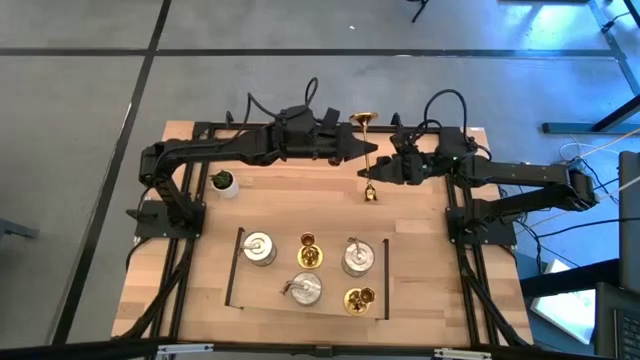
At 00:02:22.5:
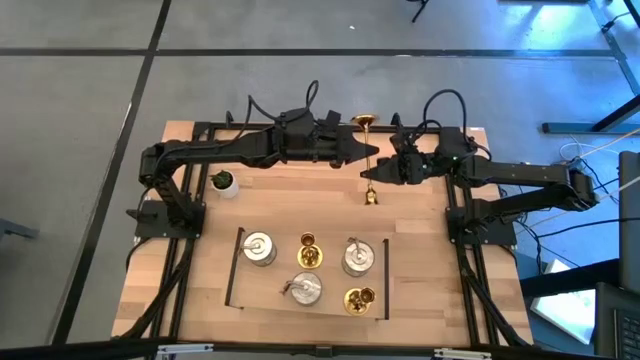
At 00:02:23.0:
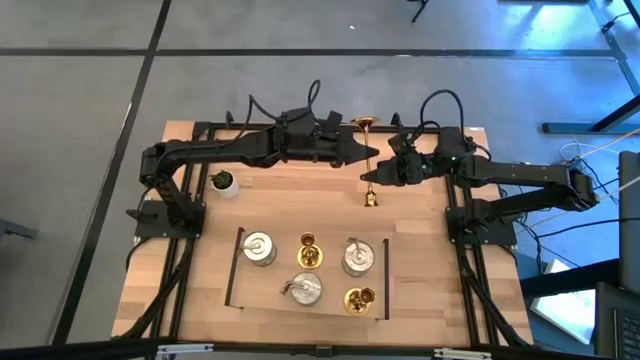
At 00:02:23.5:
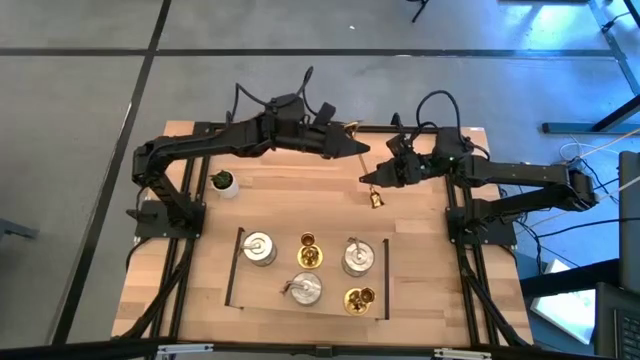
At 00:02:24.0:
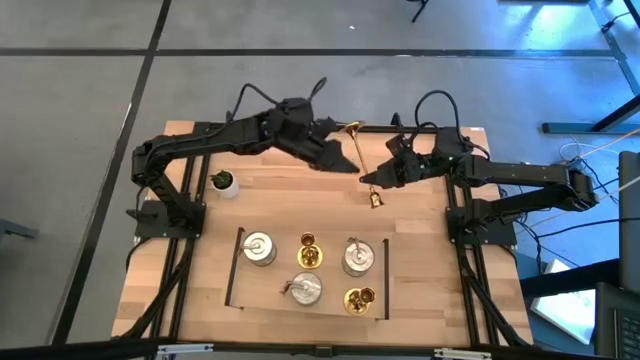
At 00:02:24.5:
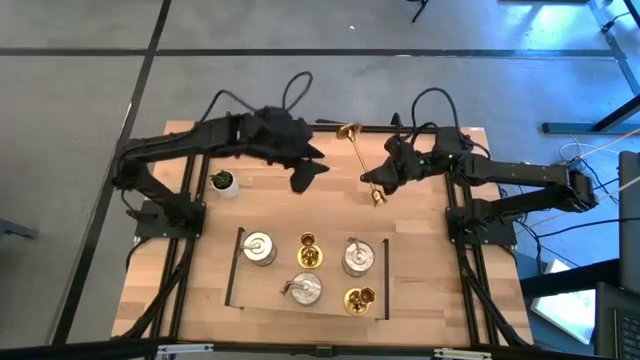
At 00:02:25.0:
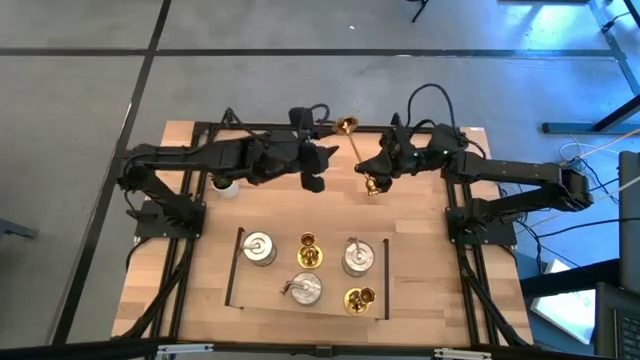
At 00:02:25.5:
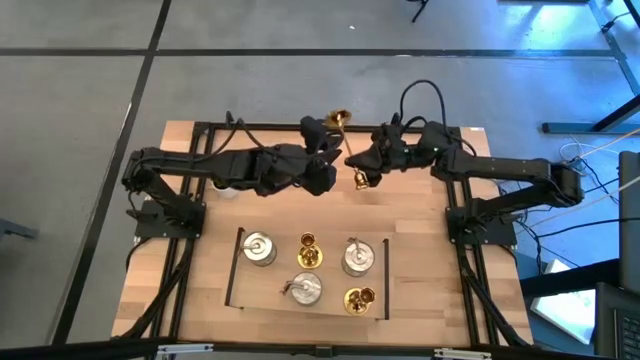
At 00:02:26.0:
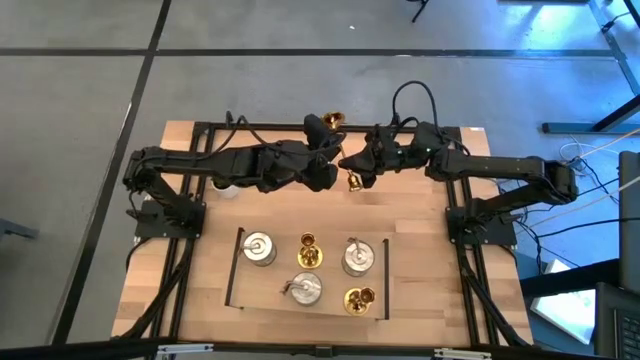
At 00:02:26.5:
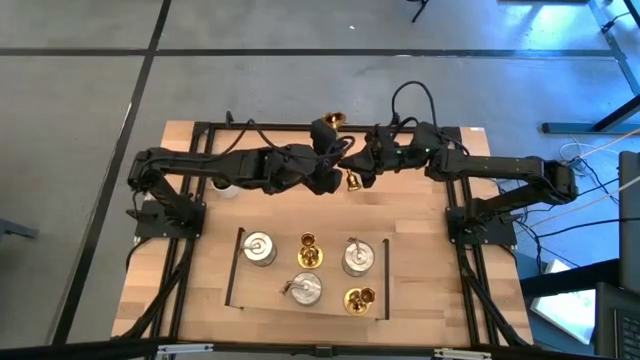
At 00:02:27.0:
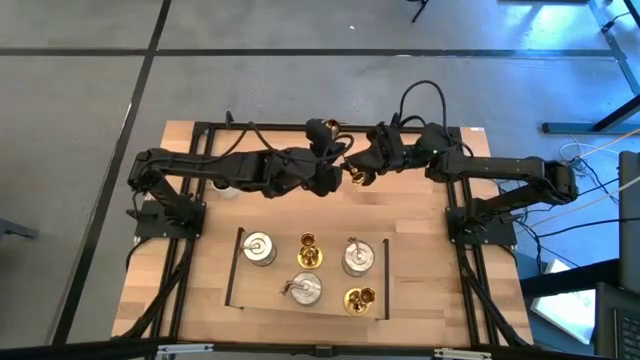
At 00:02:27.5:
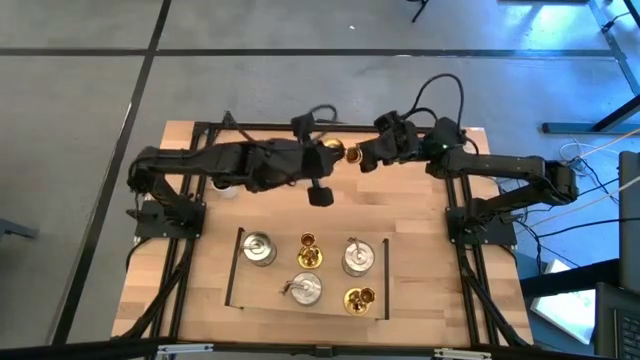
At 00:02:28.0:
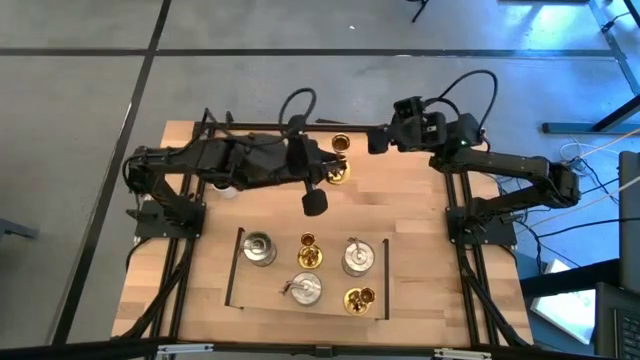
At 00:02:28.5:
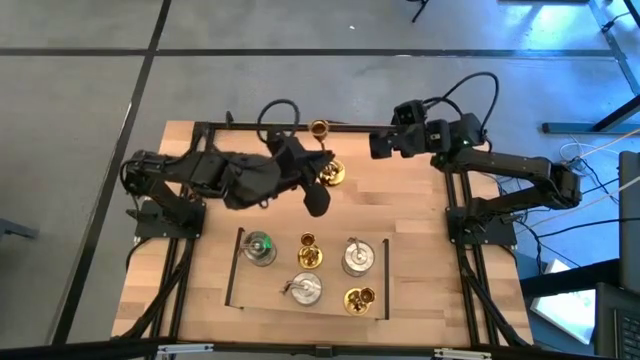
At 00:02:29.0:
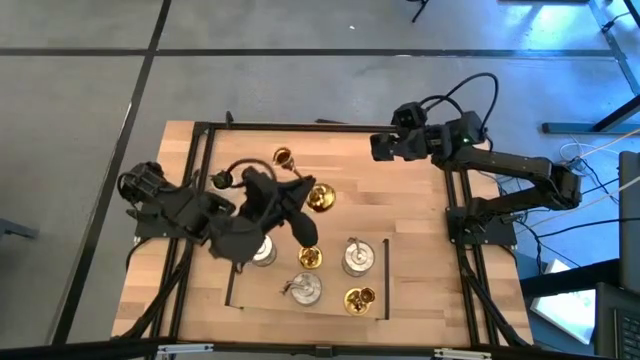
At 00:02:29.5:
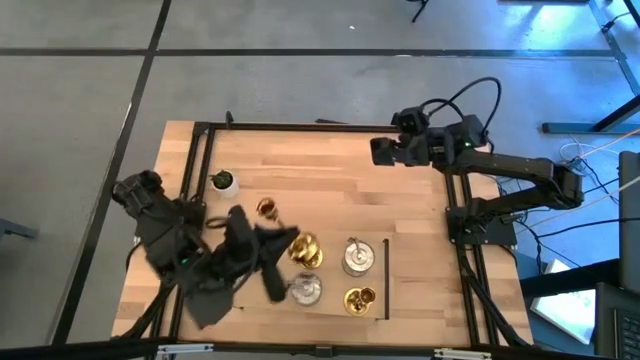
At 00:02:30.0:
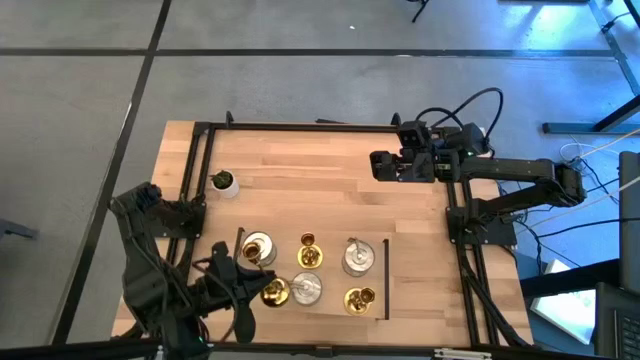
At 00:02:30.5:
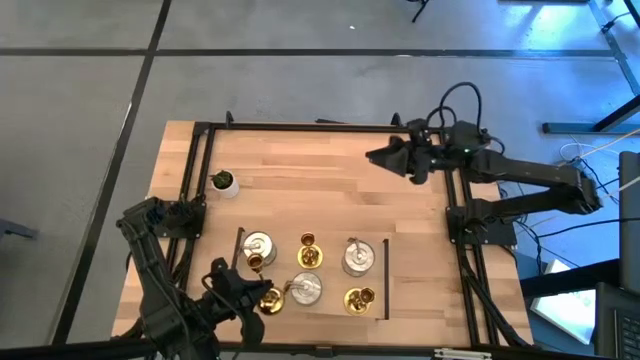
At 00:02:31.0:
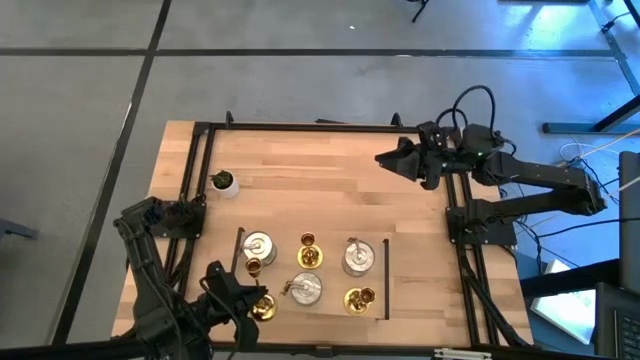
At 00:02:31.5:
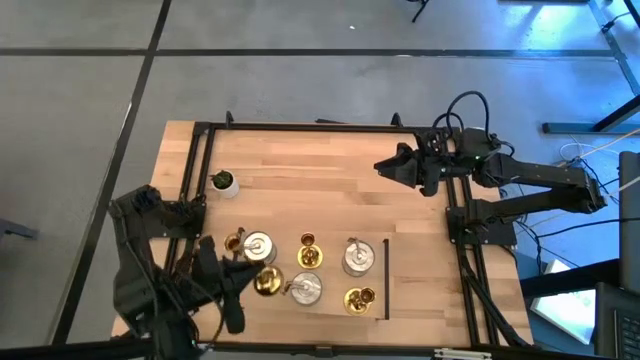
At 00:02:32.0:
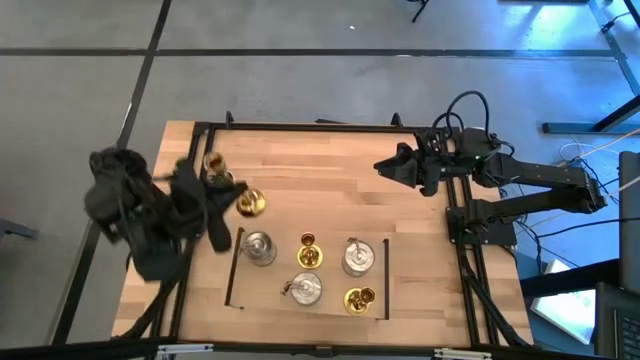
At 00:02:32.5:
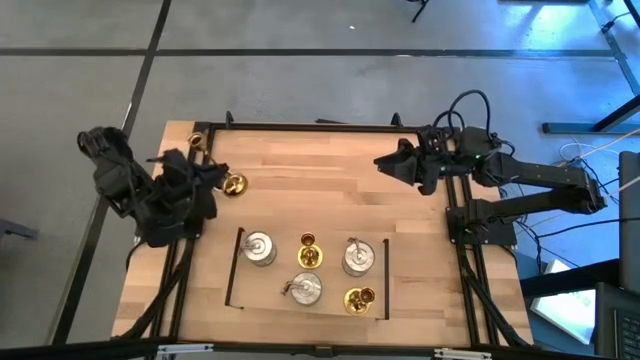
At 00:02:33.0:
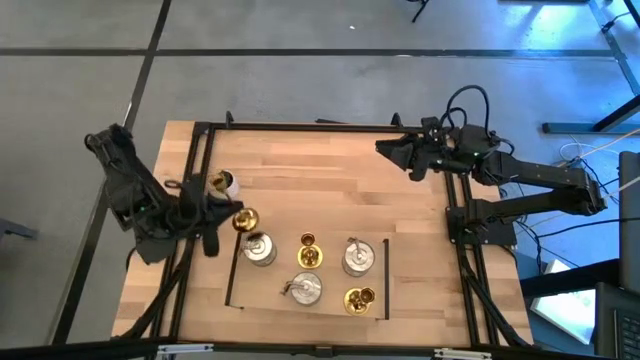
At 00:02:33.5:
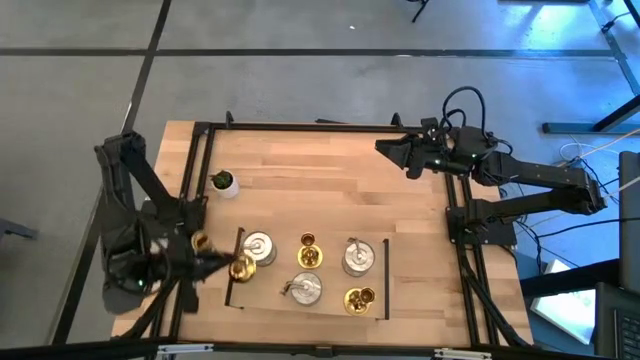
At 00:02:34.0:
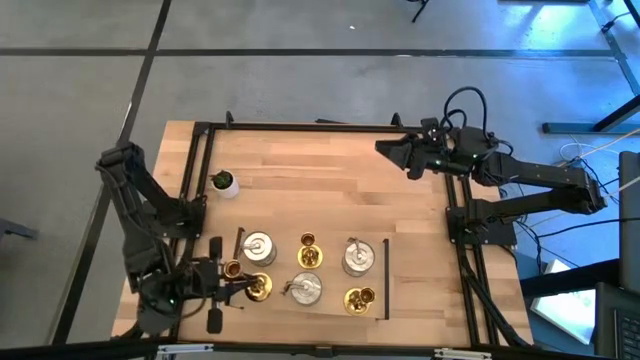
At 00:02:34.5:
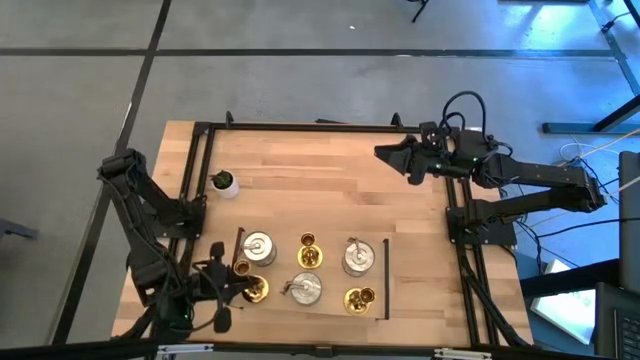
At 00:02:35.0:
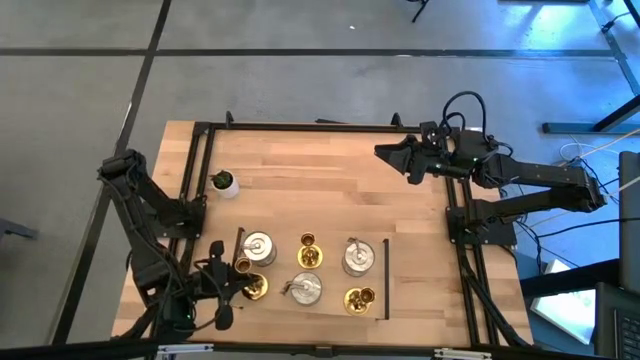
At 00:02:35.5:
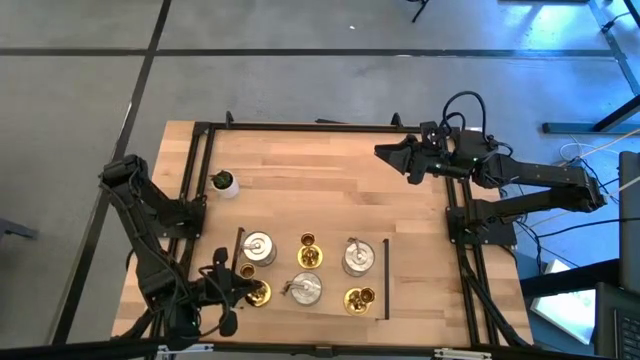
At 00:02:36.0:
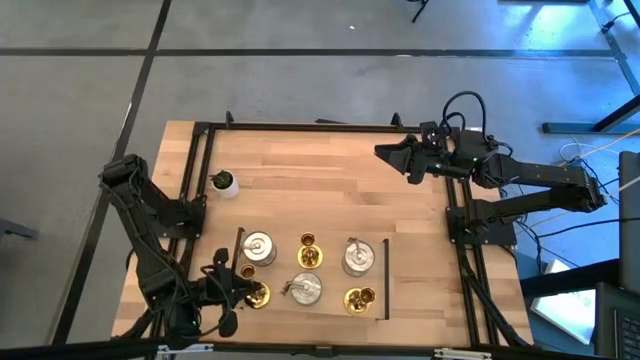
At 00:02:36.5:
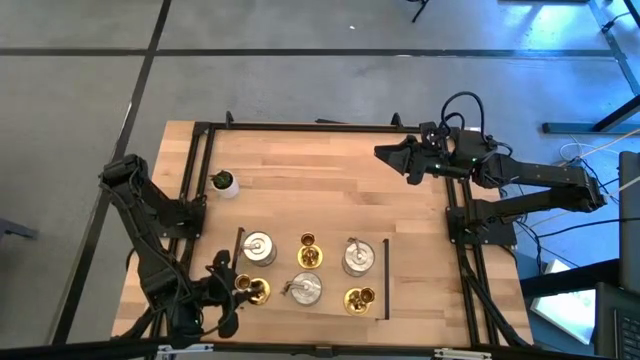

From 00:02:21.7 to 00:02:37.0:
Task: Pick & Place candle stick holders
Put the gold candle holder on the shelf

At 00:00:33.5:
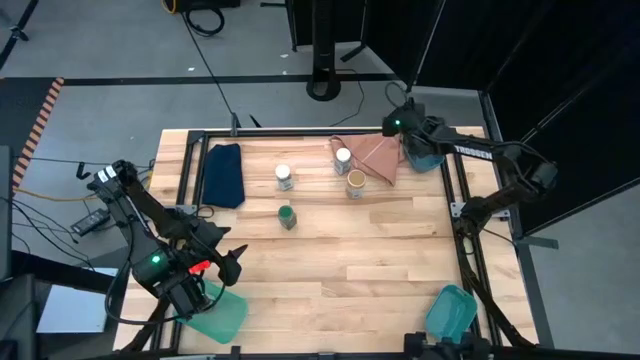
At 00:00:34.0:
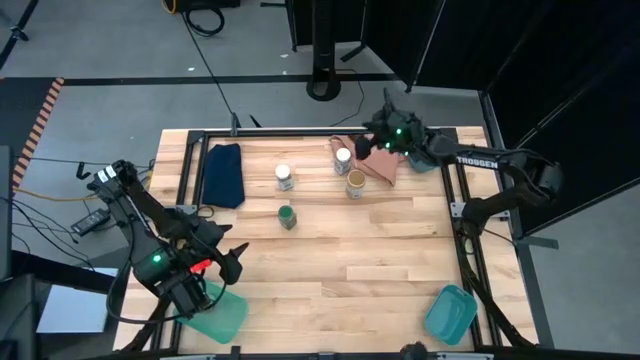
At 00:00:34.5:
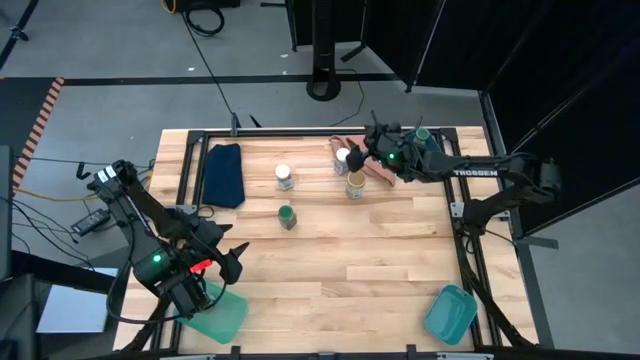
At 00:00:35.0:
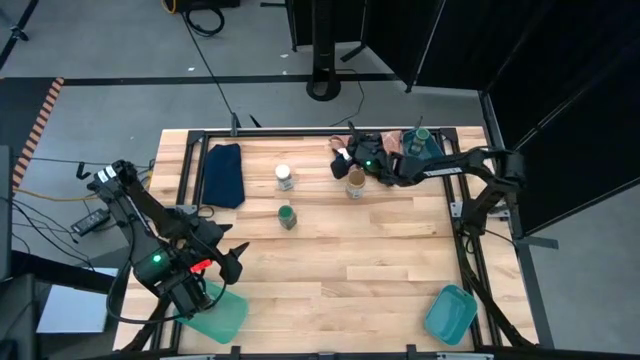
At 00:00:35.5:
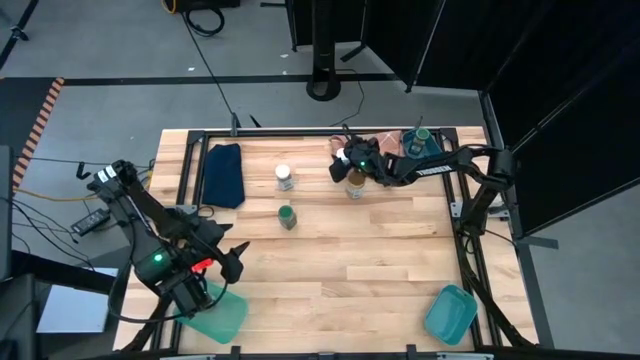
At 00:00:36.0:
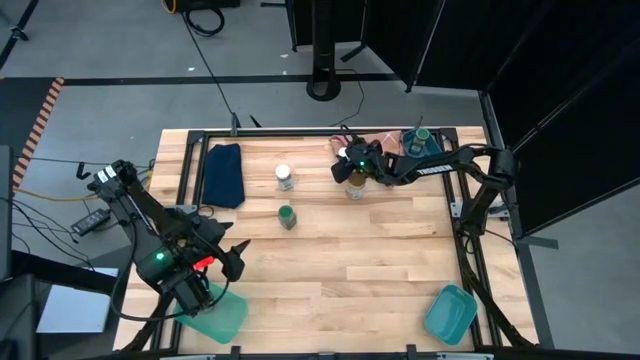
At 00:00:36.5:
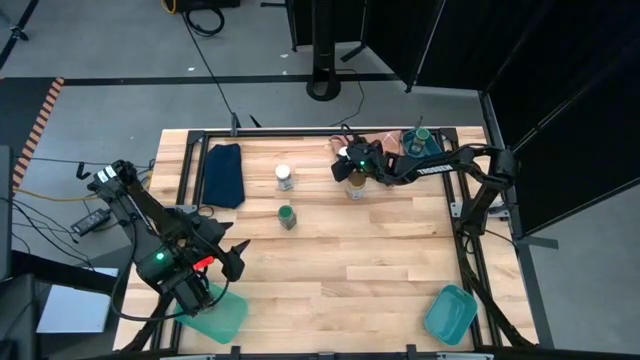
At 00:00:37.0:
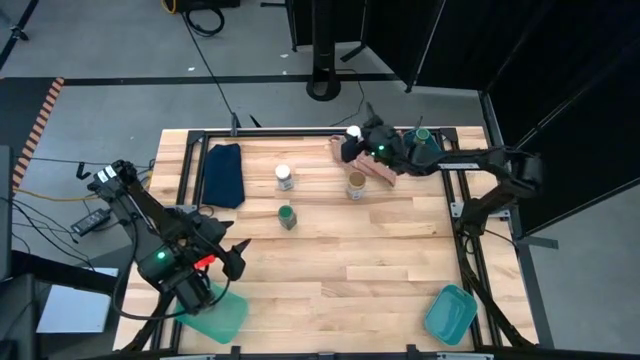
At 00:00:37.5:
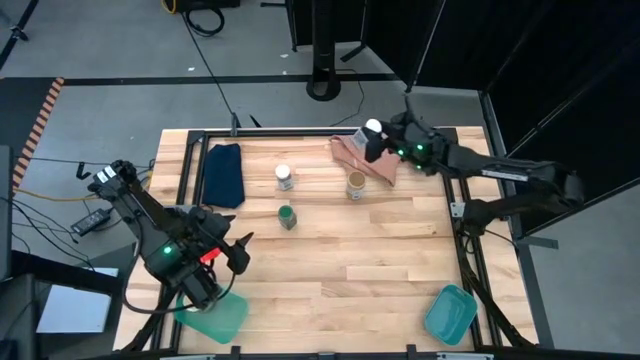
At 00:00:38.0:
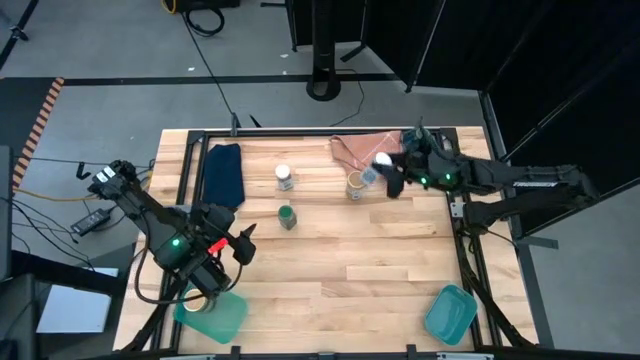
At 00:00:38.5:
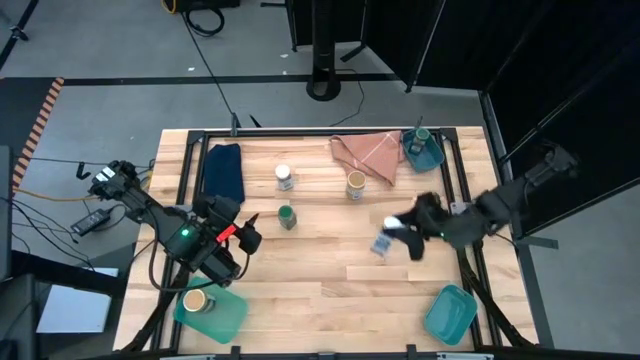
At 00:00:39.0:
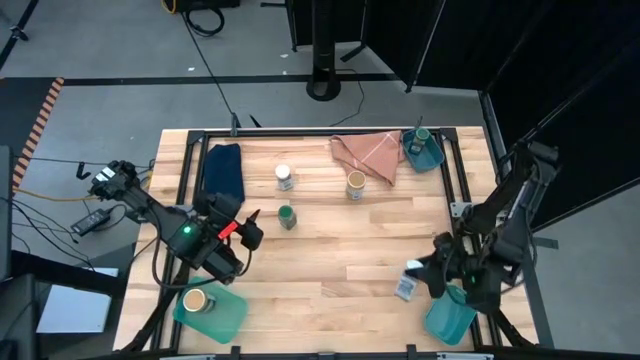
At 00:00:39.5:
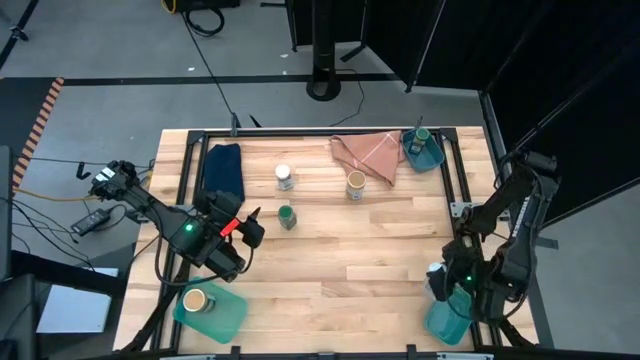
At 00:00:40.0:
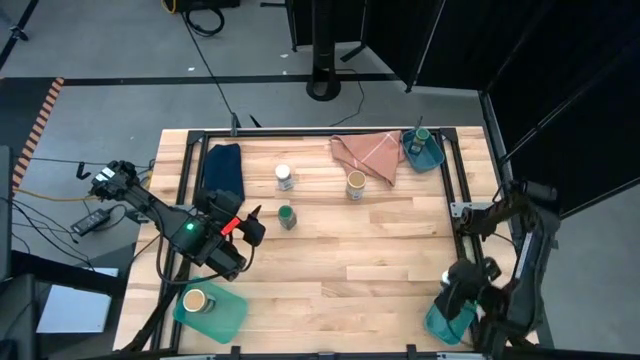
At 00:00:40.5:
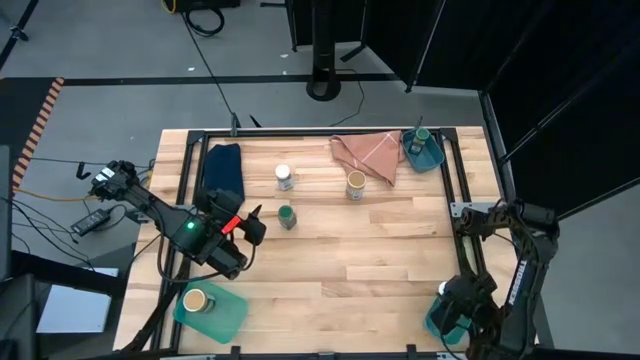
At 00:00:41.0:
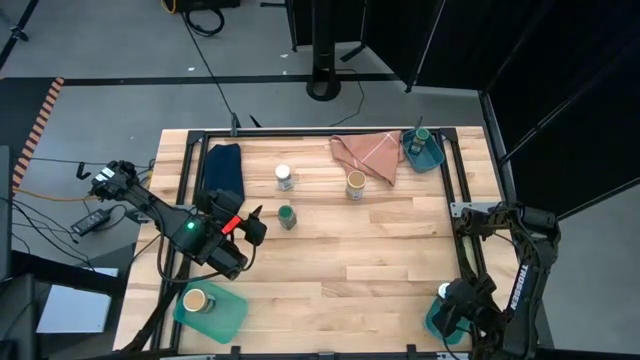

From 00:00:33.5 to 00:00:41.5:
Task: Sort spices by type
Put the right white seasoning bottle into the green bin
